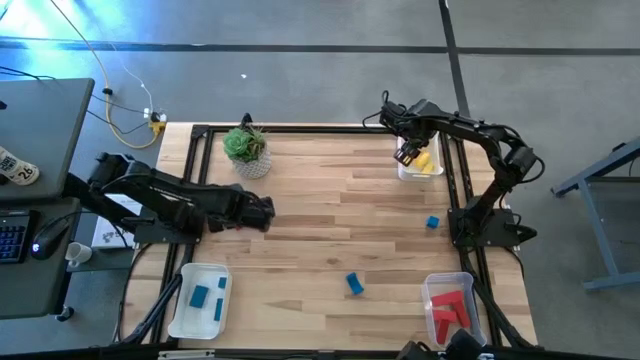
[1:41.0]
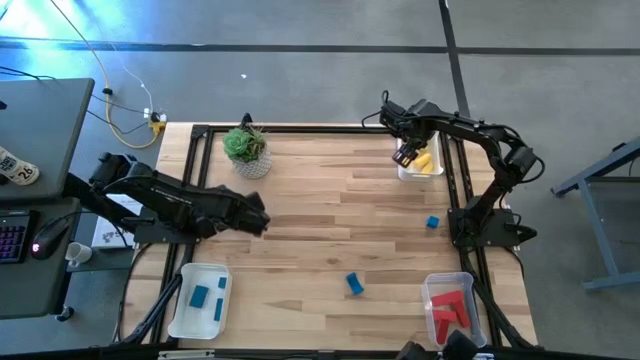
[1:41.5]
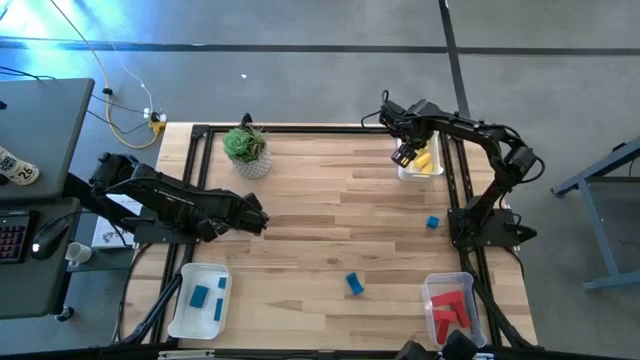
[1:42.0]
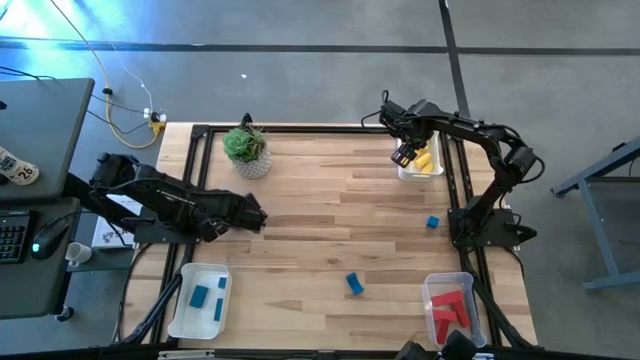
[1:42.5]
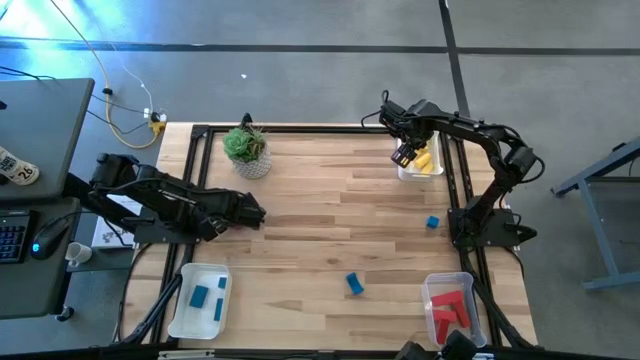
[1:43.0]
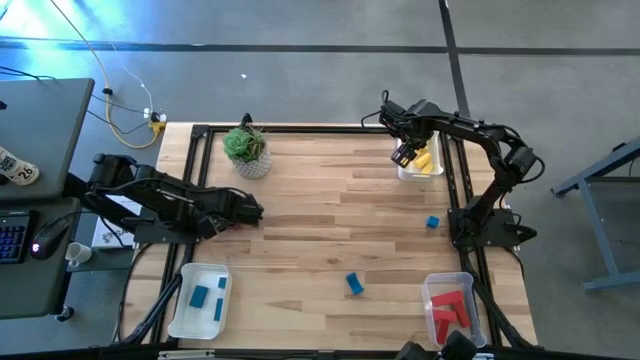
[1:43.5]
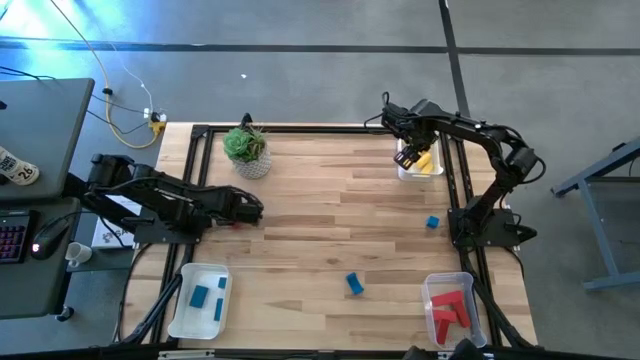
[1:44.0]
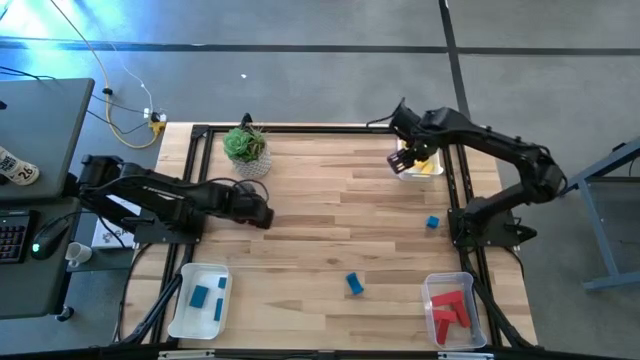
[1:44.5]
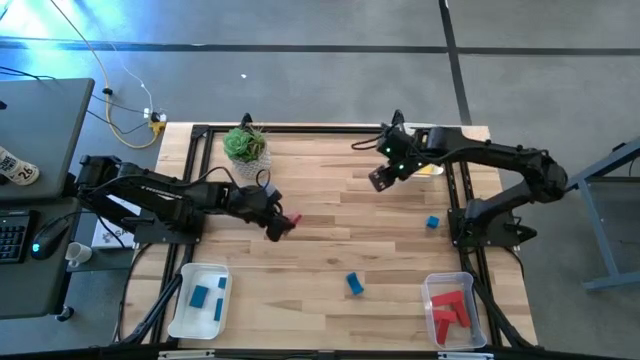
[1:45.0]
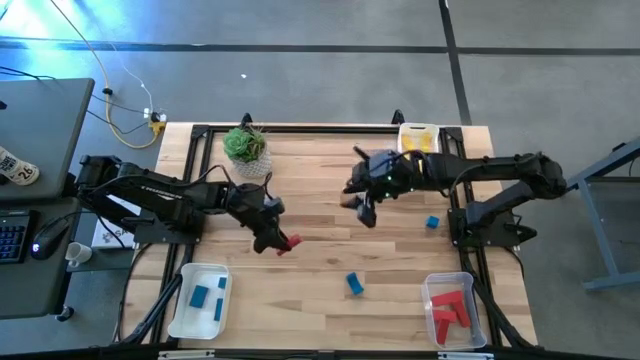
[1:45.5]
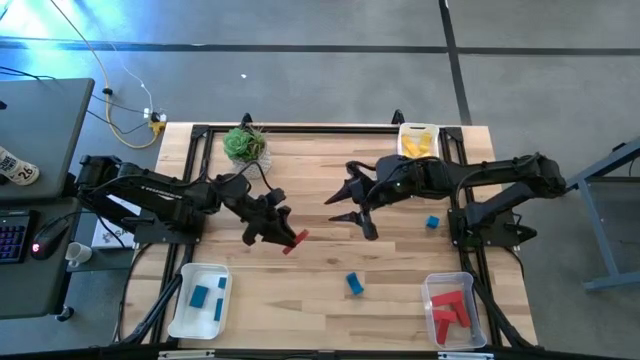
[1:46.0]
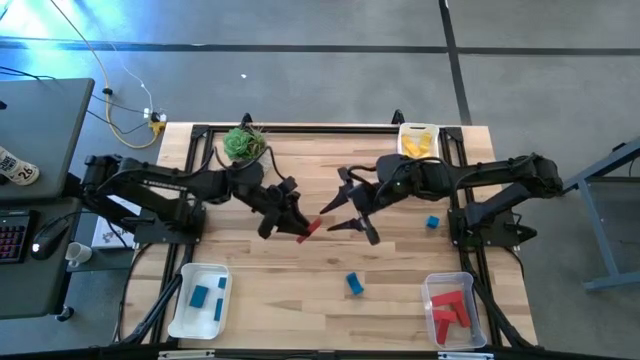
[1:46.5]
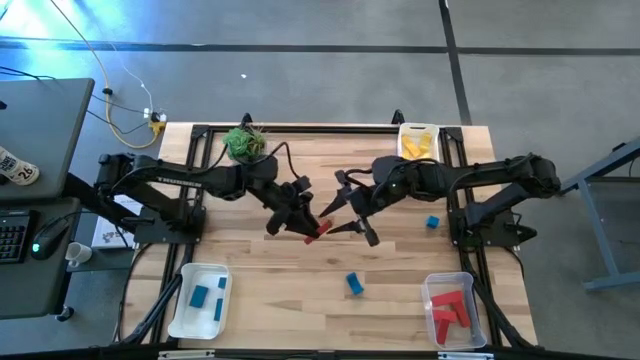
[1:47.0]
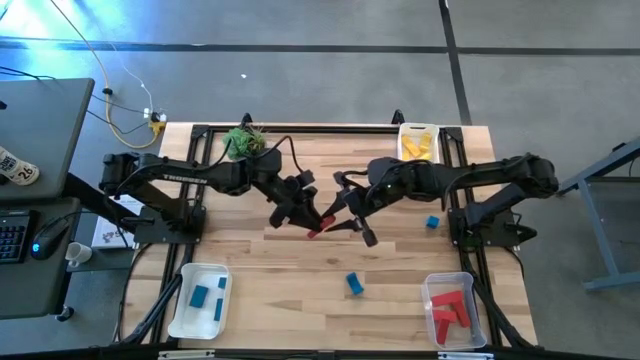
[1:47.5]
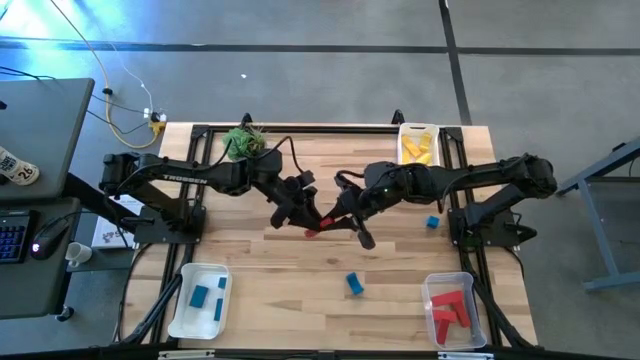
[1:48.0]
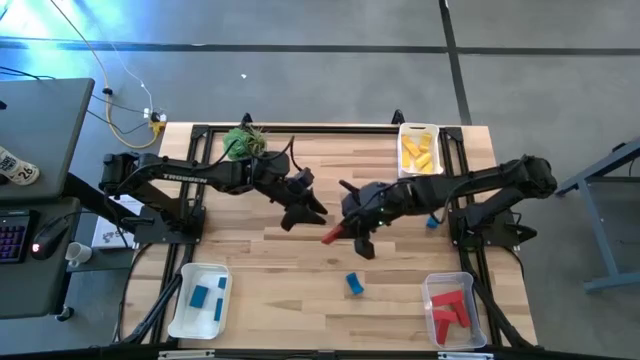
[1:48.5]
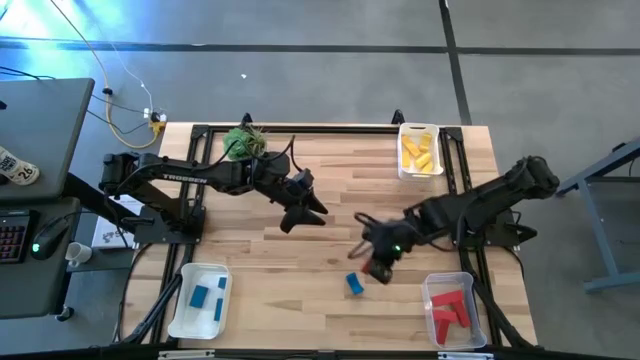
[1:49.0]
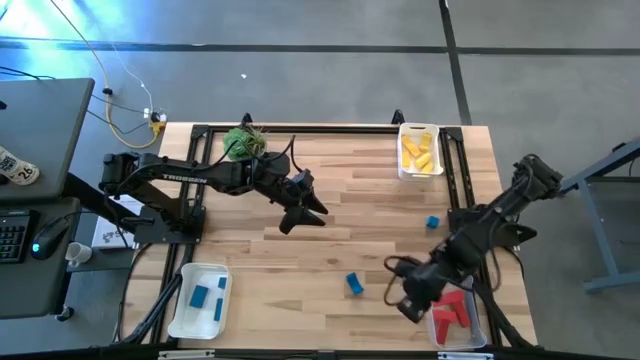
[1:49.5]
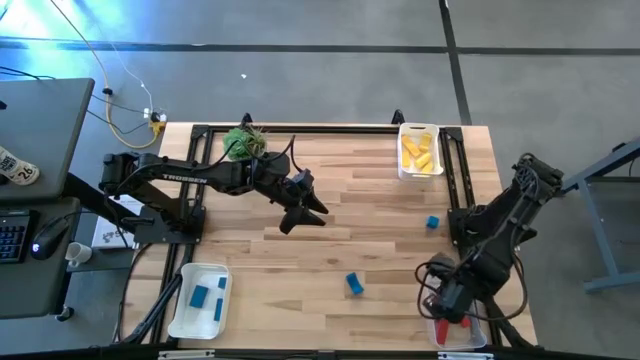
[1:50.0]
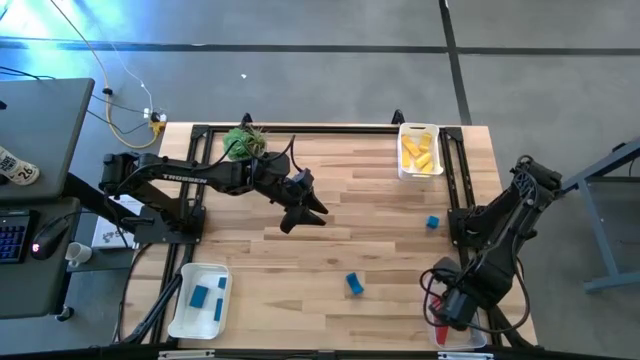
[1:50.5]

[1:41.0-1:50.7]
Task: Sort & place blocks by color
Put the red block into the transparent bin

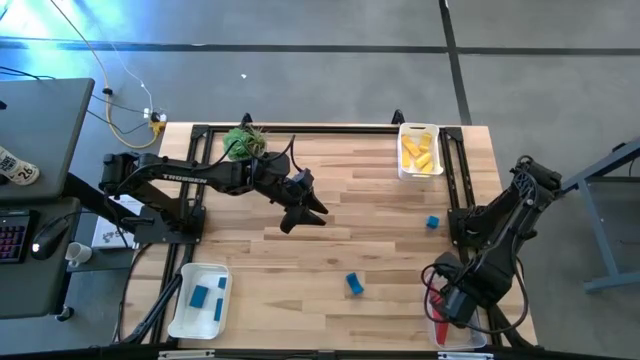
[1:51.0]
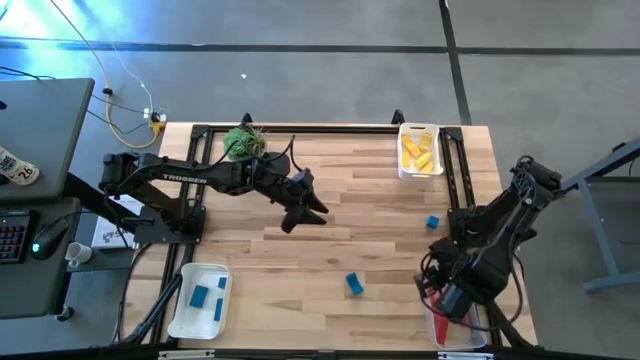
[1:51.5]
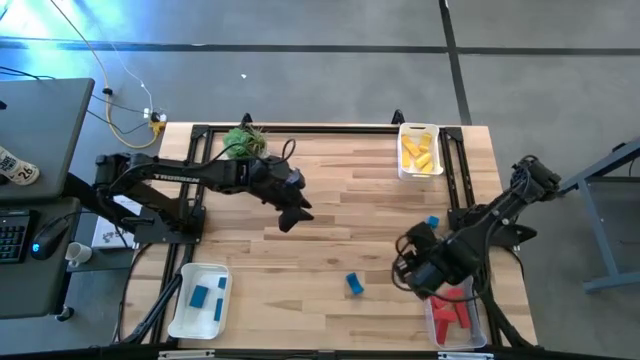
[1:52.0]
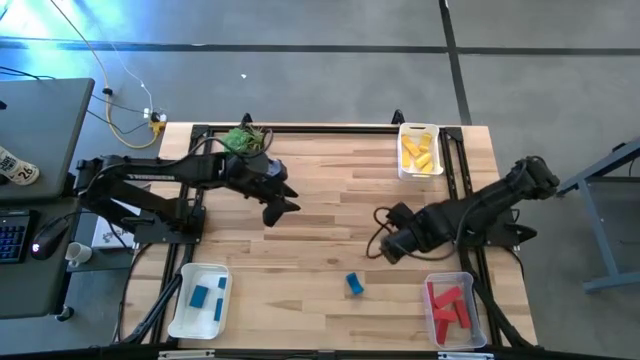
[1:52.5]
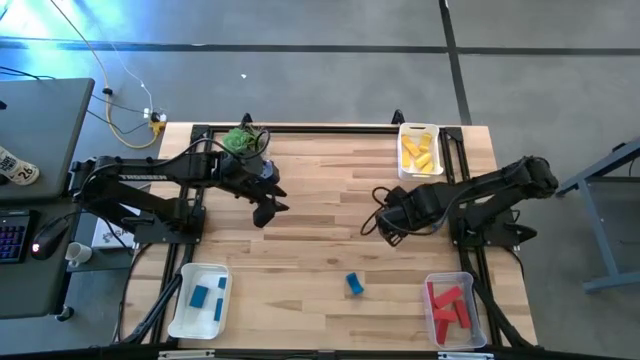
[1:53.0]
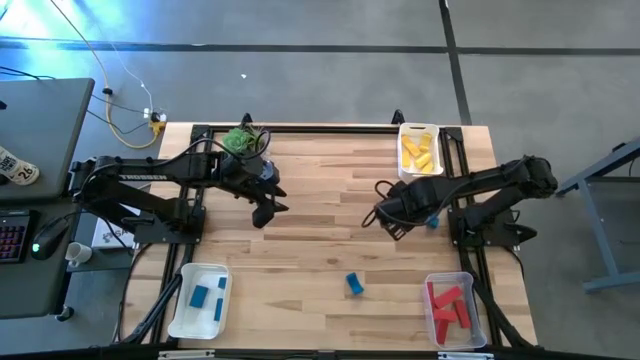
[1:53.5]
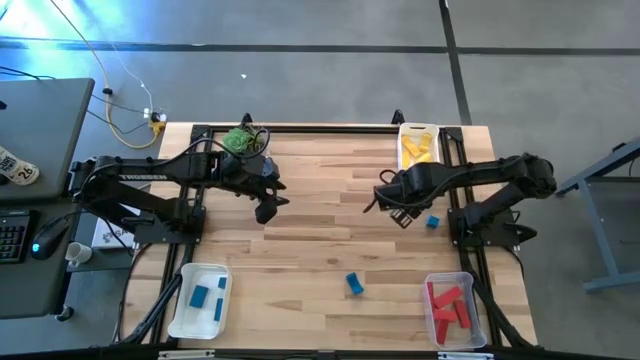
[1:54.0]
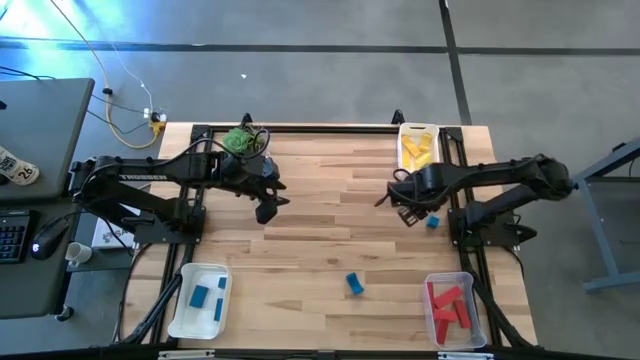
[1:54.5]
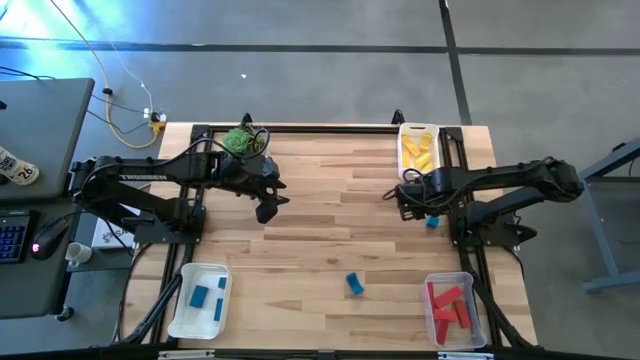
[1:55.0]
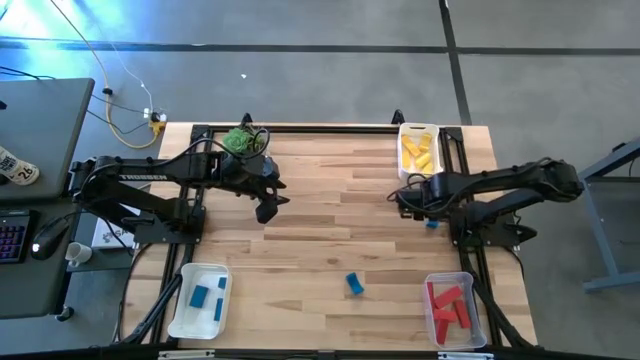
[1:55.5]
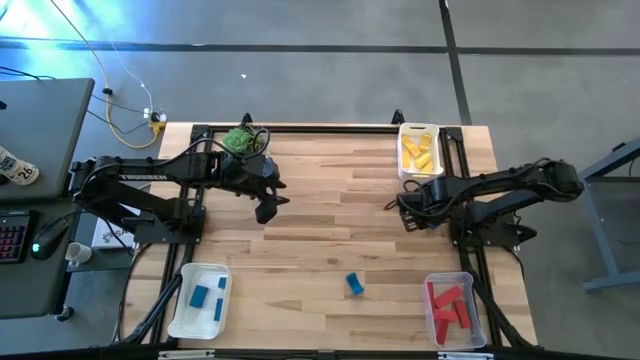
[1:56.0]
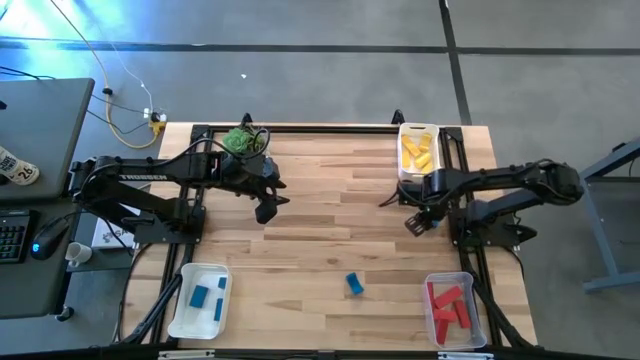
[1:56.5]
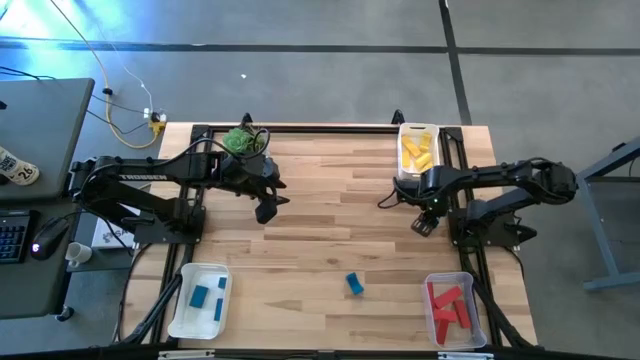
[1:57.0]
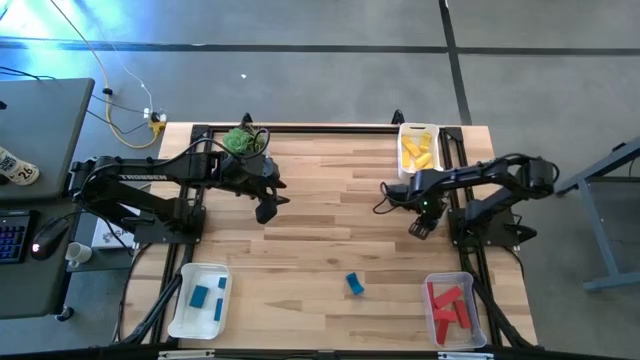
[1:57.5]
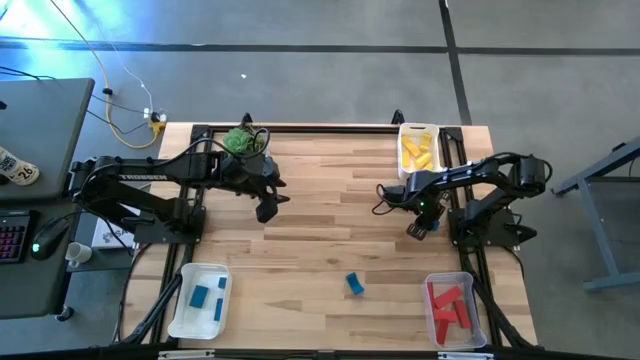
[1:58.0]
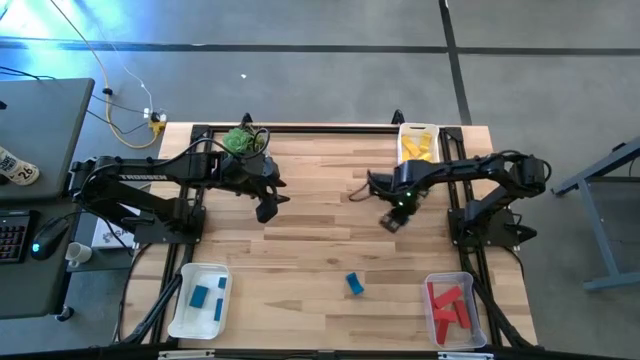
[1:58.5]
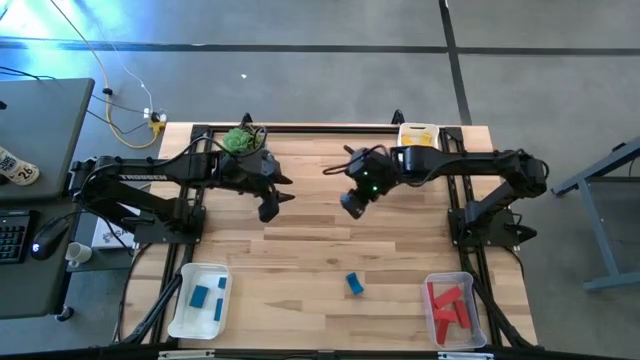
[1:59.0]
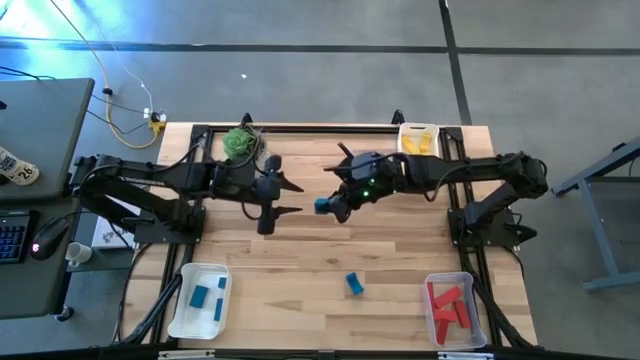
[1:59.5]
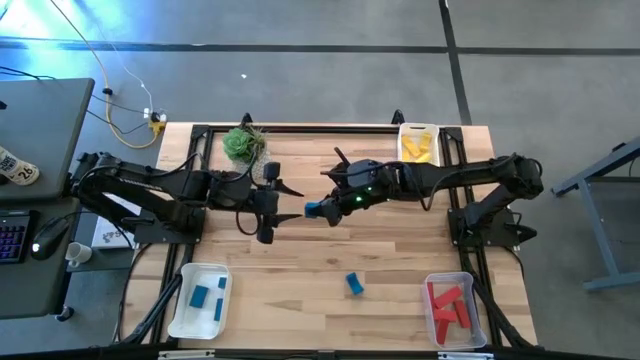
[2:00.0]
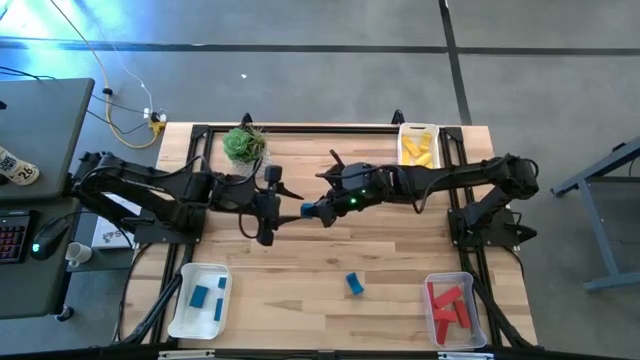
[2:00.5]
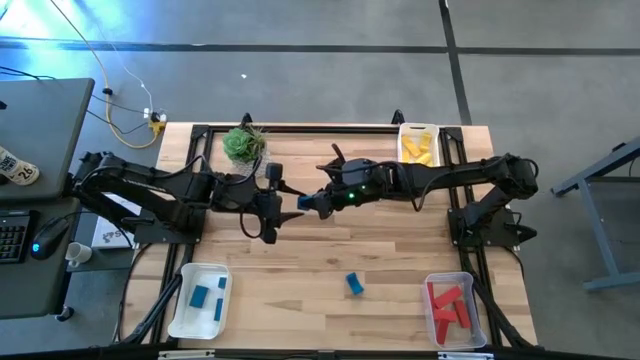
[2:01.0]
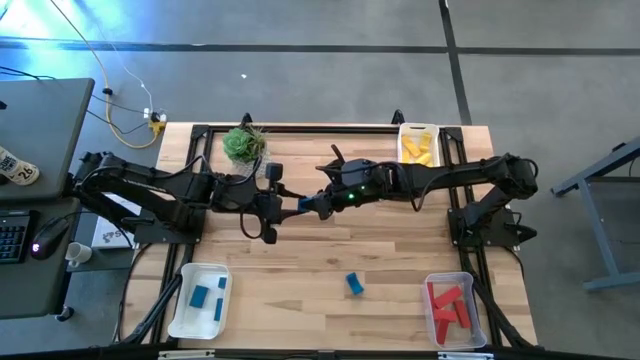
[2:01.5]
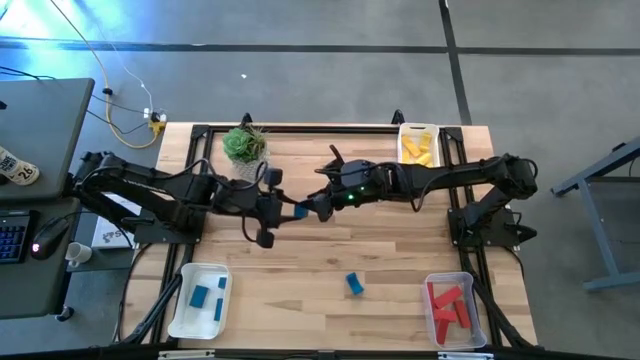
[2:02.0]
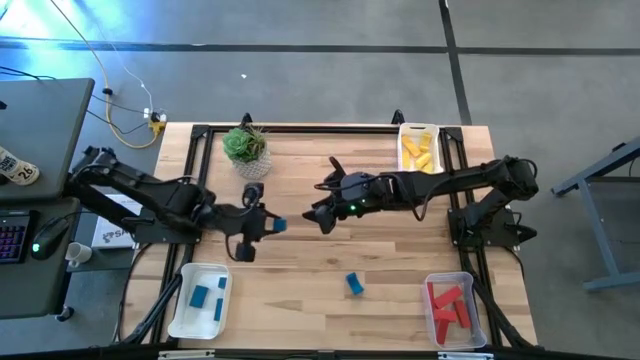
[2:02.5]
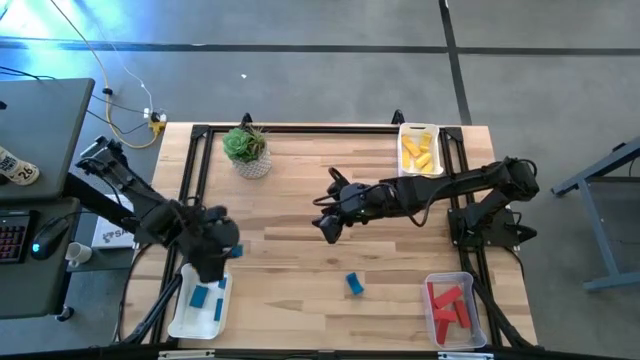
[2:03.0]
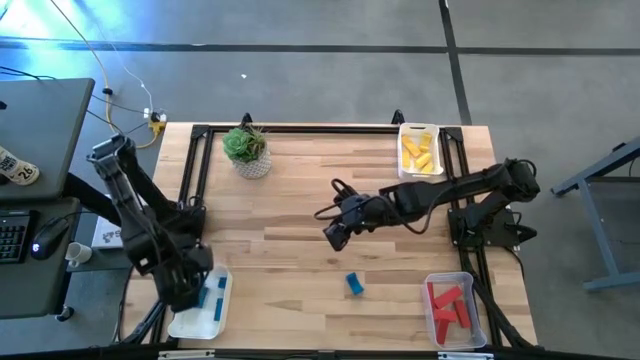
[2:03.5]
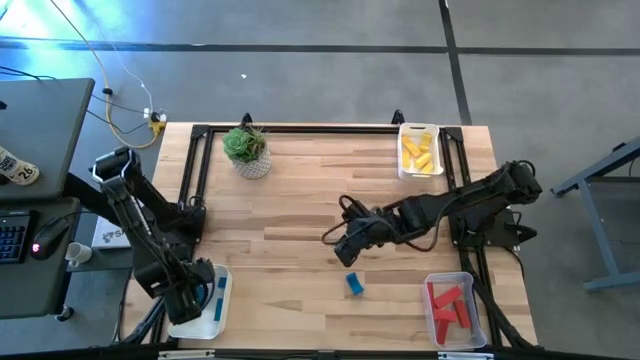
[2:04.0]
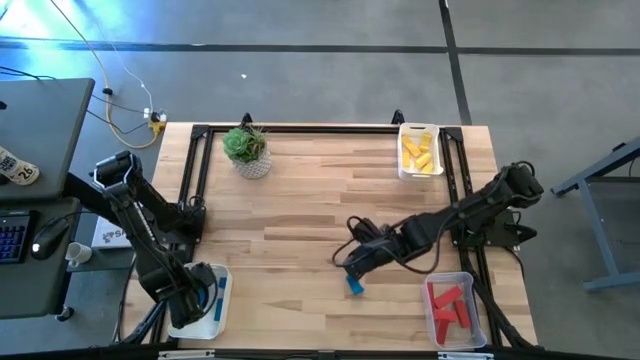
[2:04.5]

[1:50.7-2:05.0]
Put the blue block into the bottom white bin
